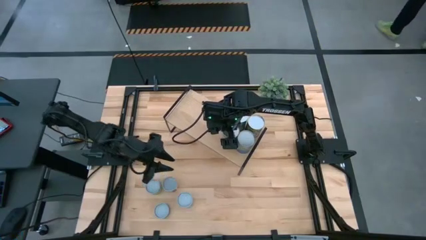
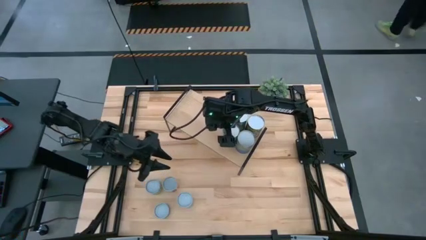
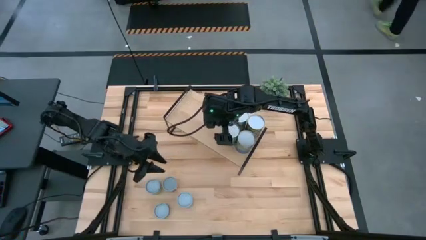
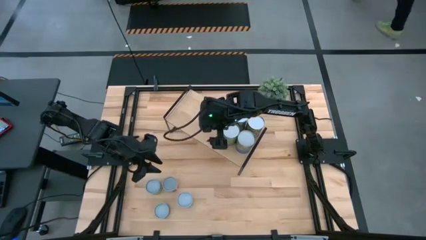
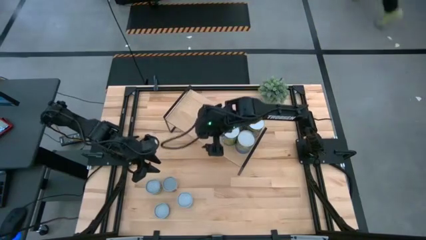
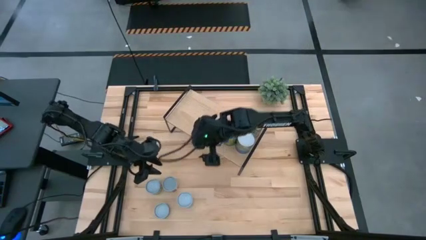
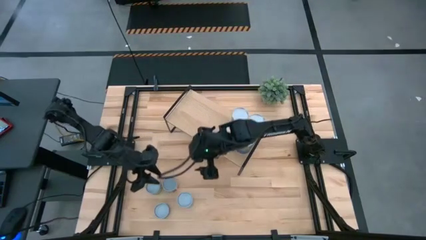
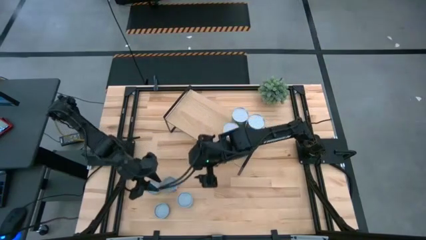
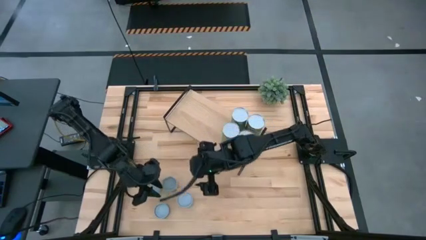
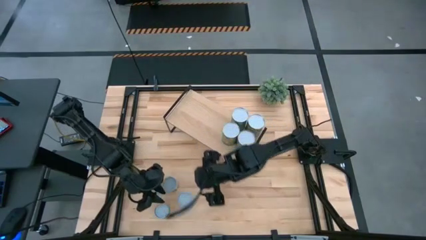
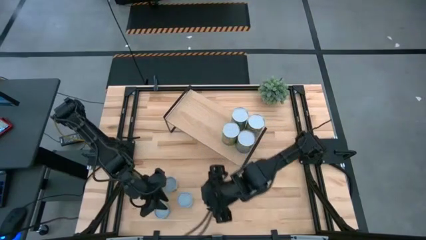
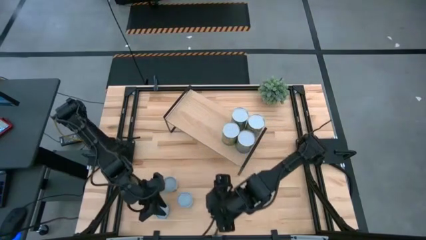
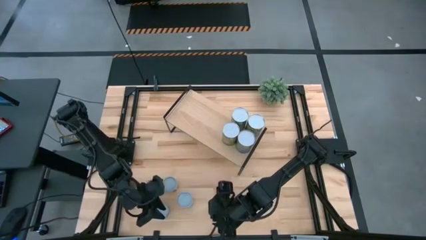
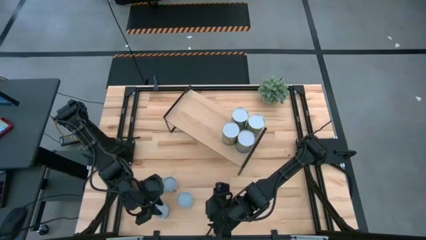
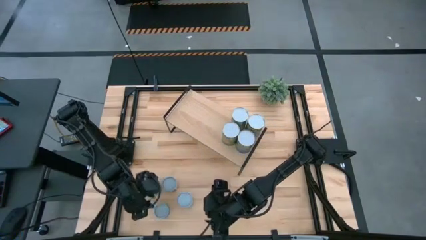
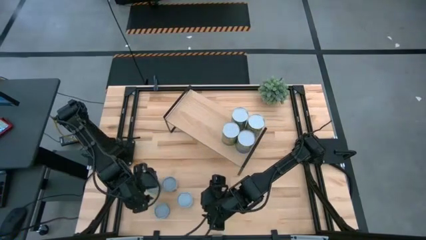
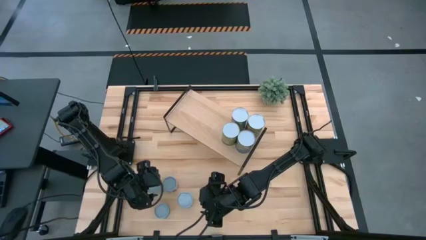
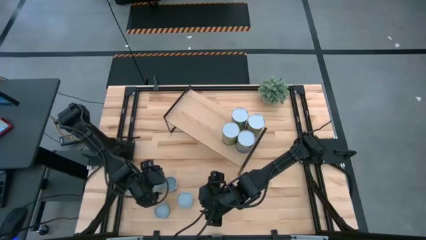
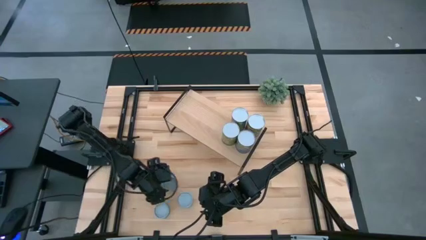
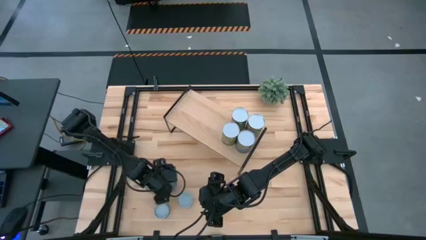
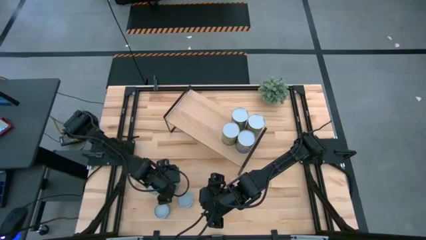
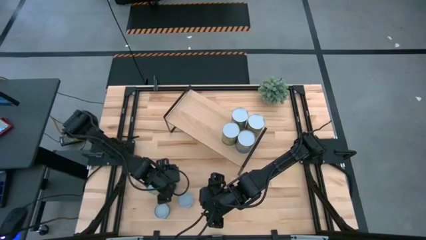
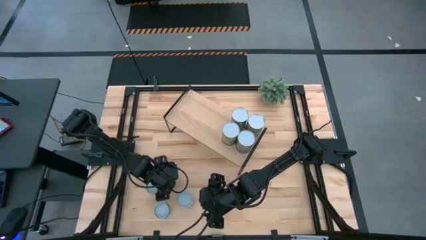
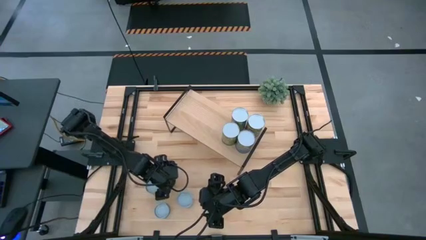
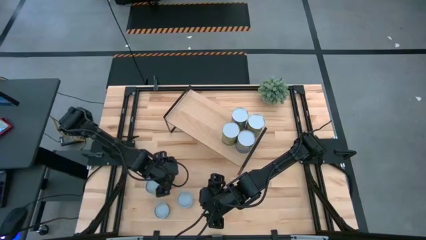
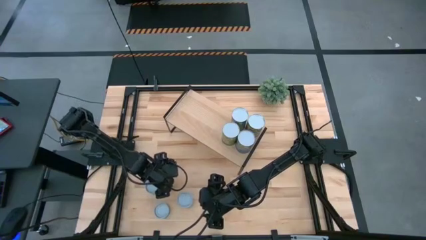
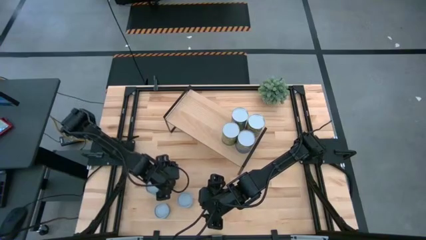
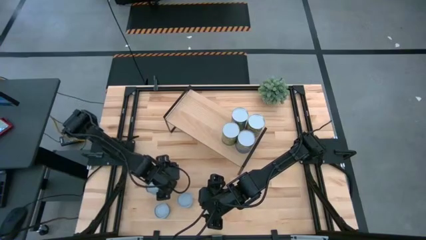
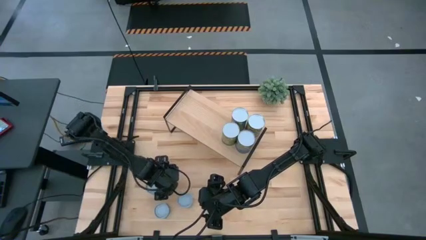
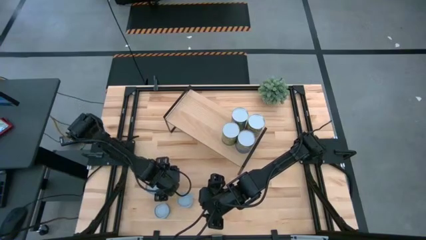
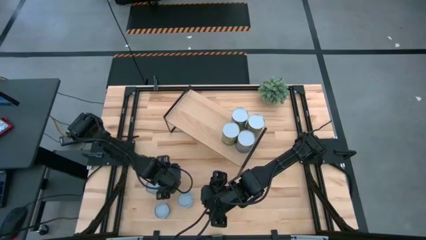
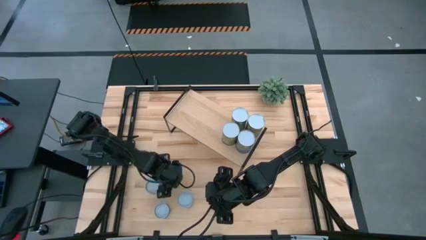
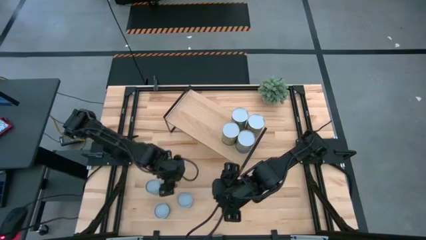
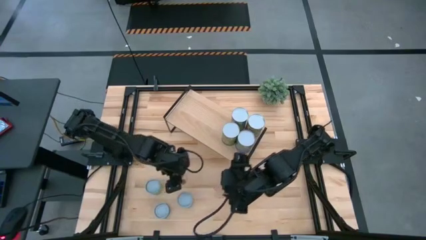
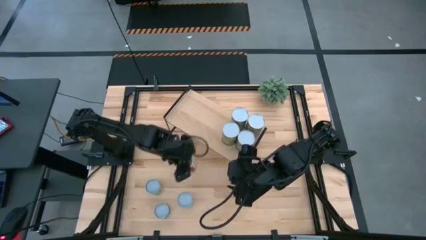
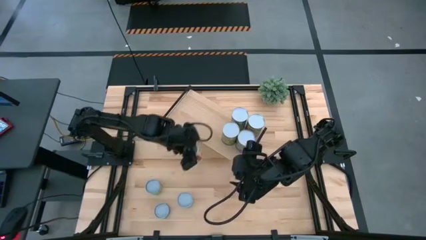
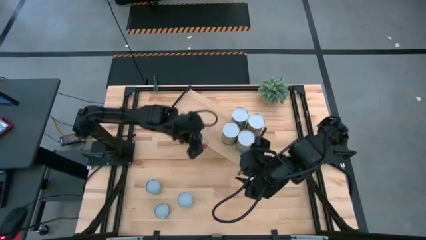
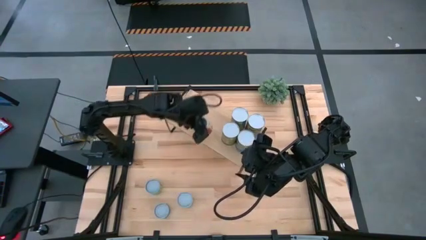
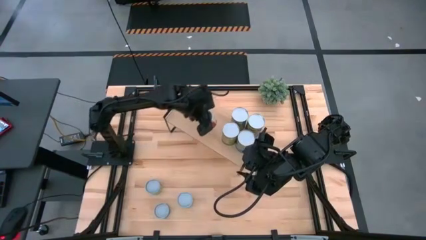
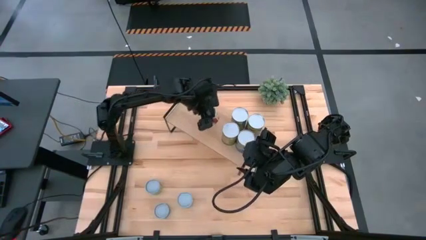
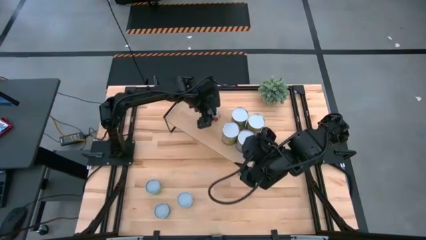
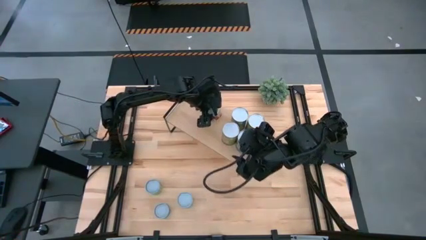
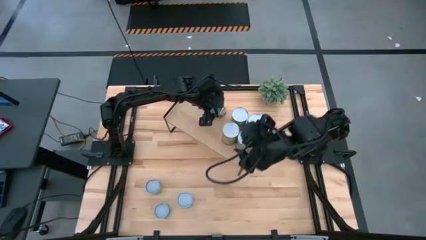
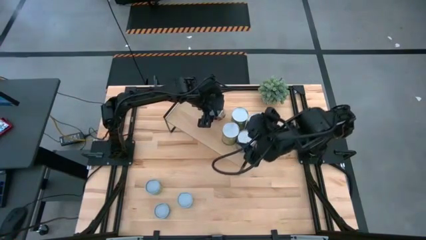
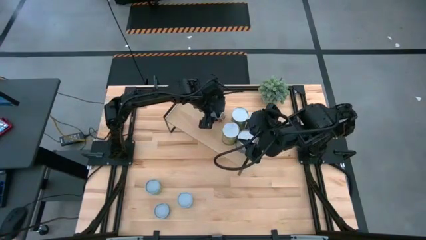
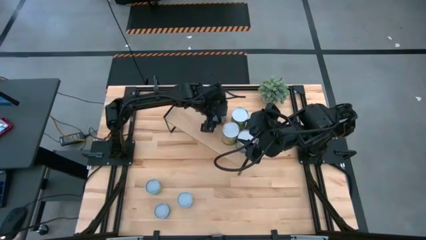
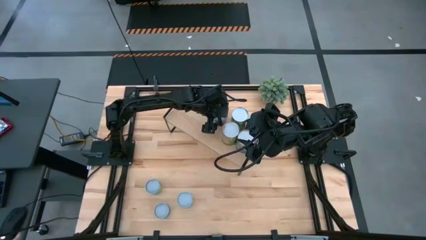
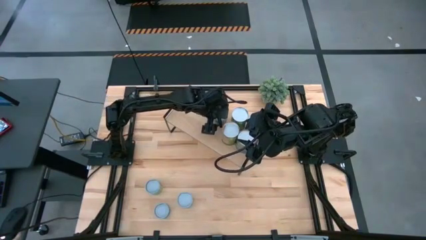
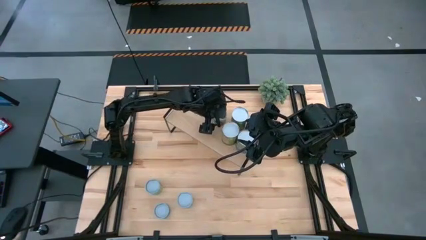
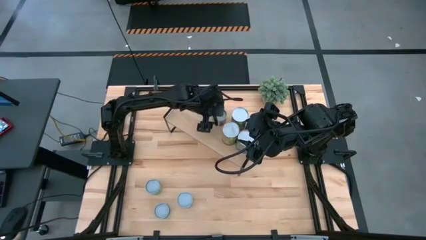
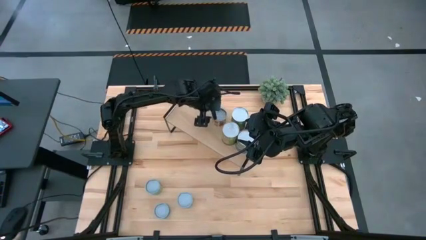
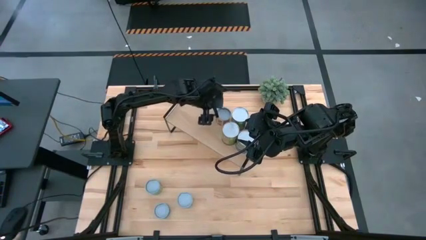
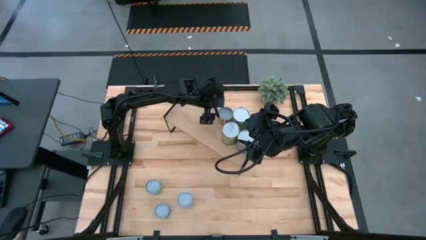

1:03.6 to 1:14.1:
Task: Pick and place cans onto a shelf
Put the canned diced tomatoes on the shelf

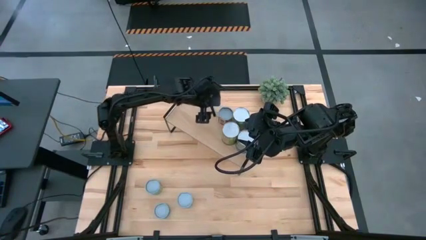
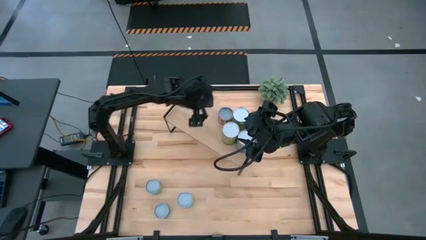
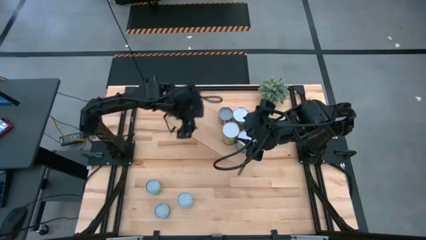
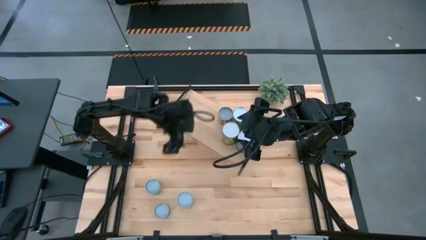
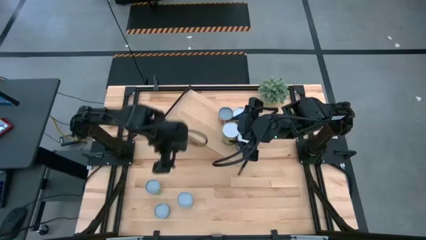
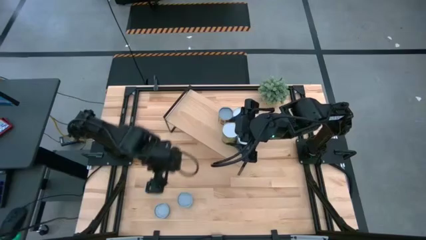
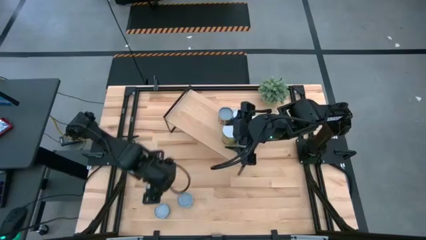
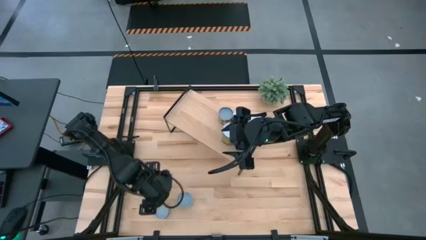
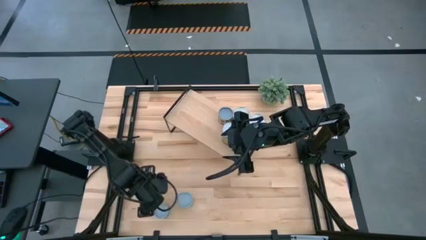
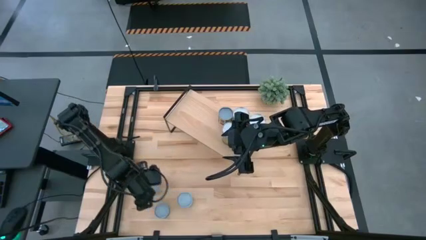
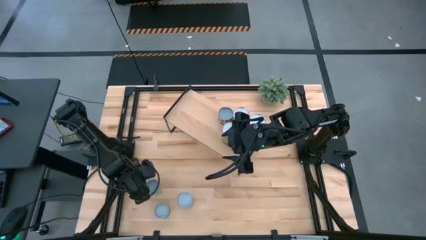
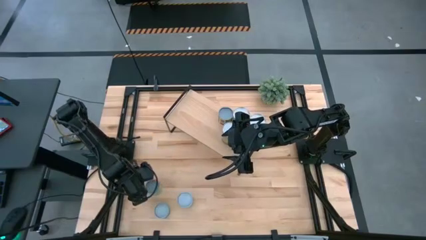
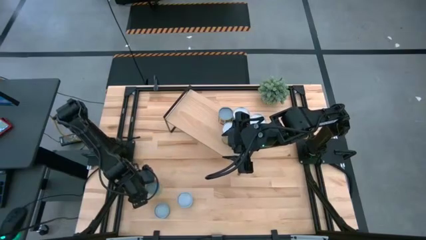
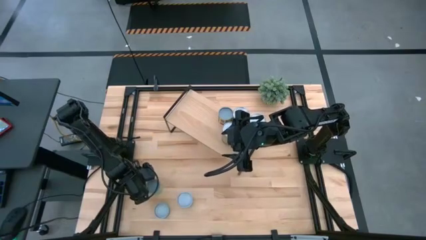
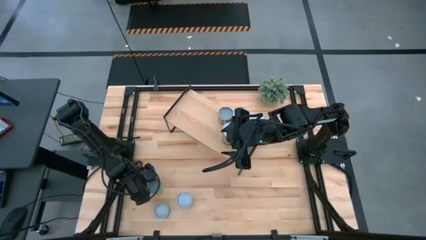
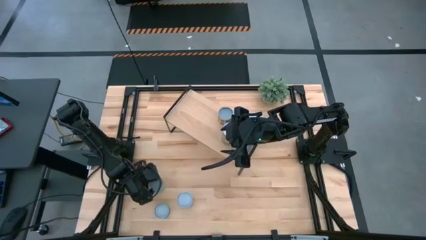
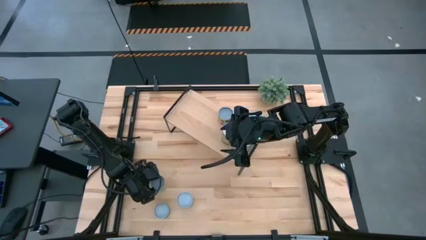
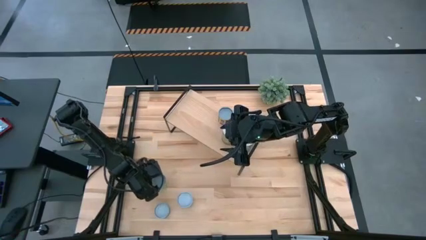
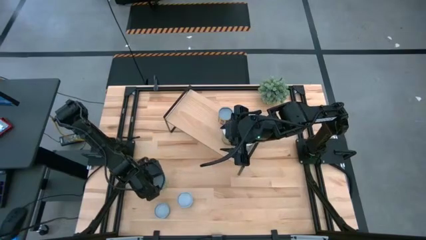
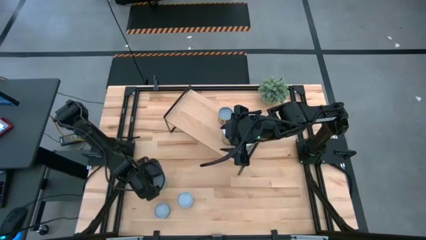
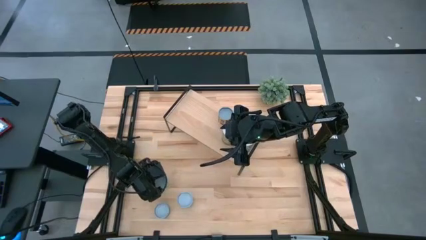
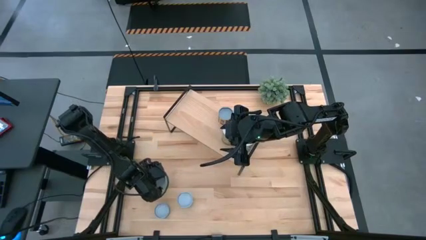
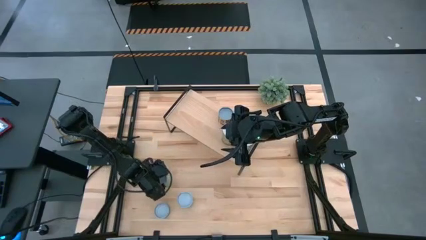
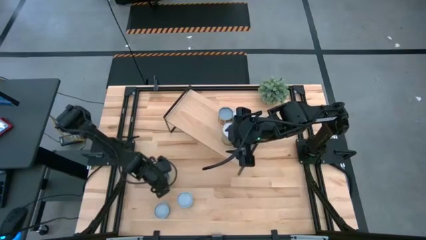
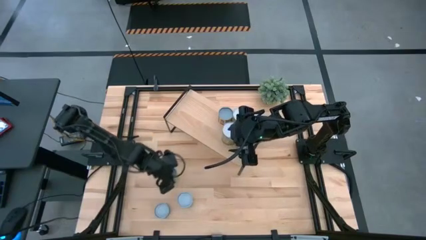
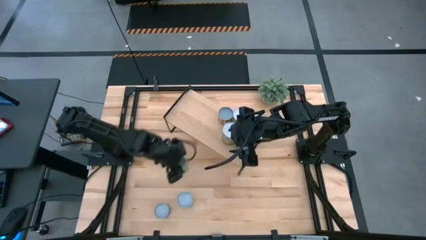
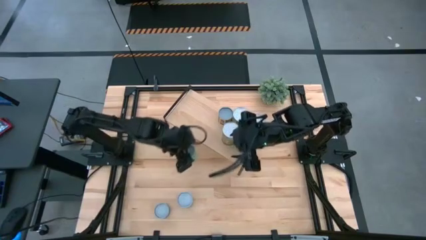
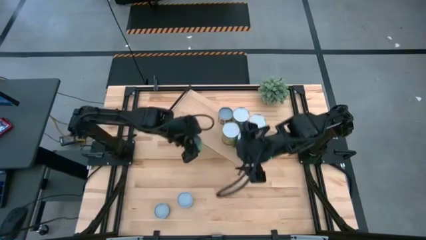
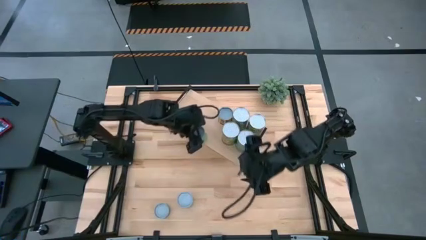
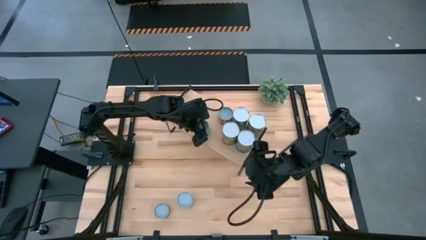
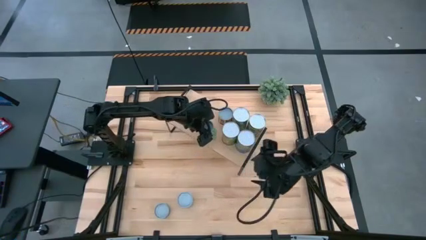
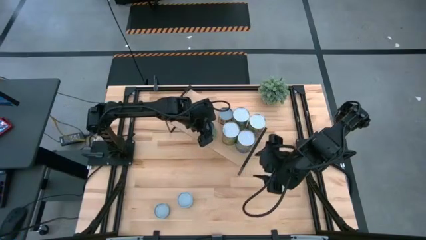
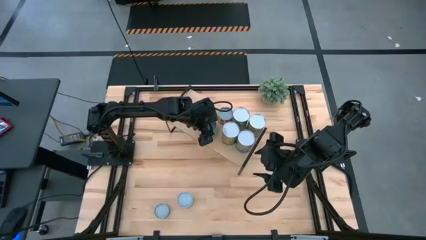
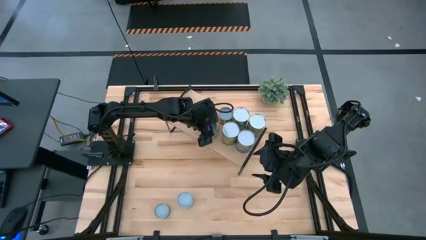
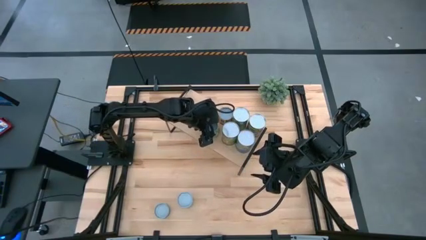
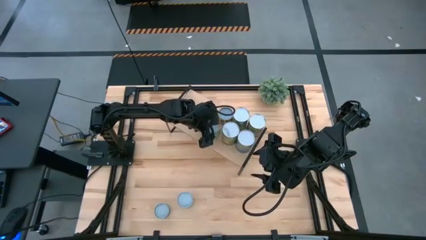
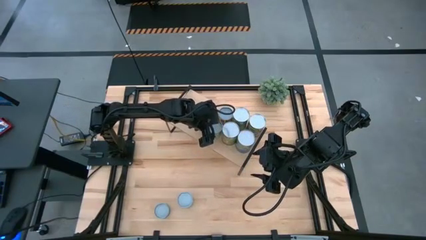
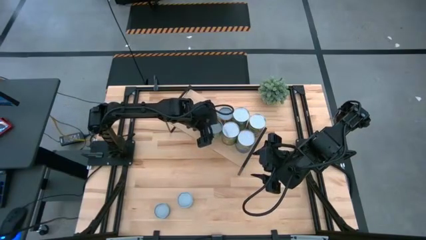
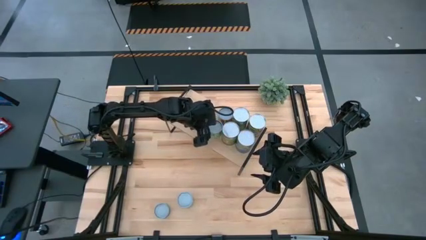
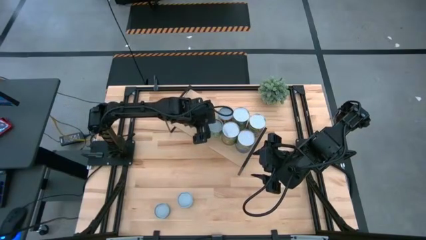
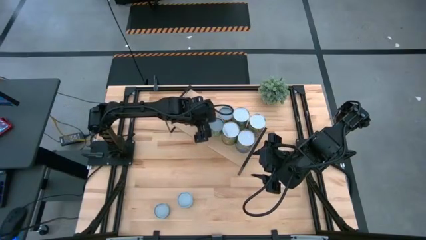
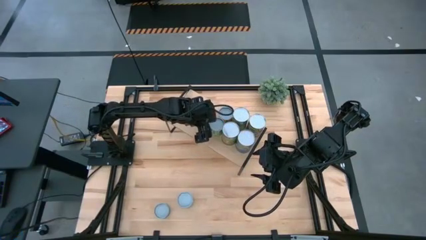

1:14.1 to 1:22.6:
Put the small canned peas on the shelf
